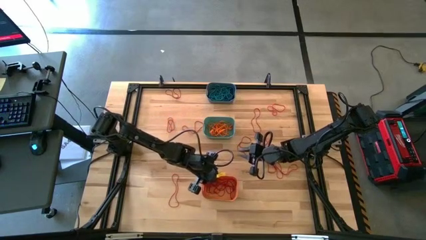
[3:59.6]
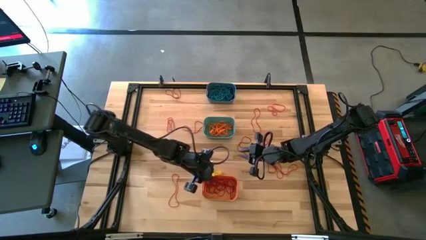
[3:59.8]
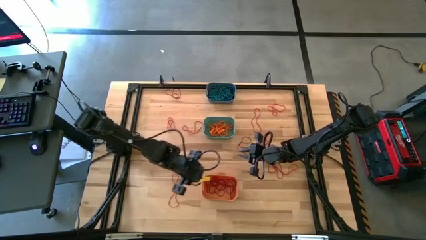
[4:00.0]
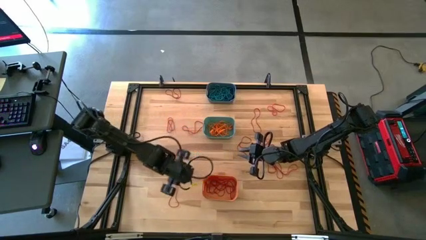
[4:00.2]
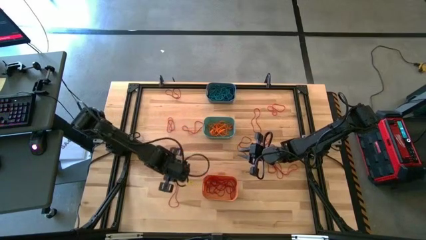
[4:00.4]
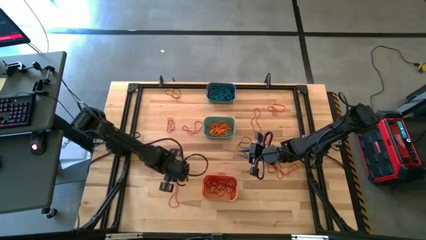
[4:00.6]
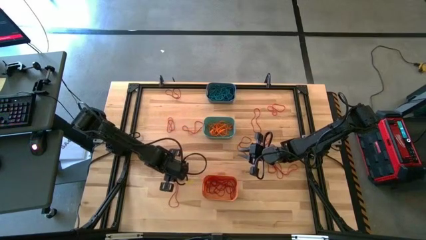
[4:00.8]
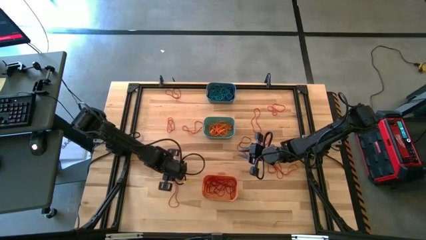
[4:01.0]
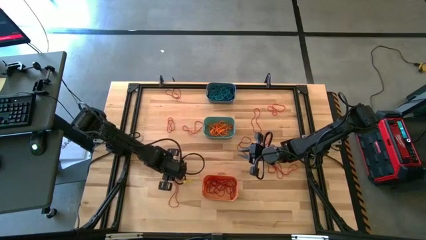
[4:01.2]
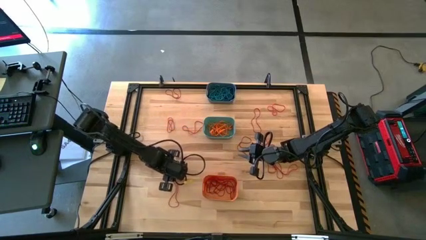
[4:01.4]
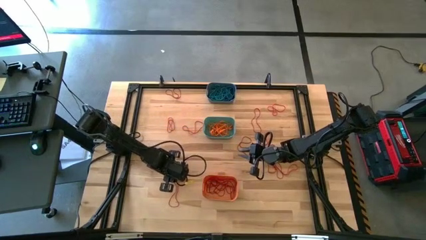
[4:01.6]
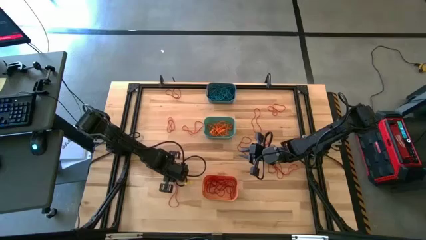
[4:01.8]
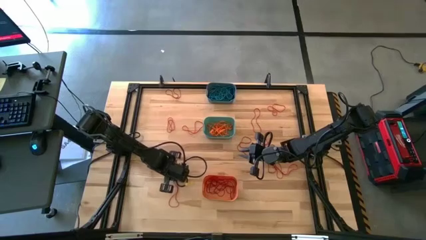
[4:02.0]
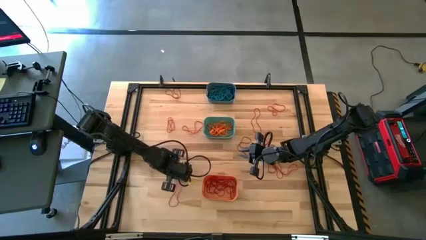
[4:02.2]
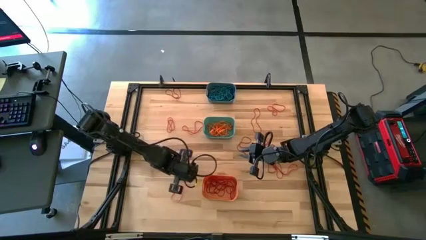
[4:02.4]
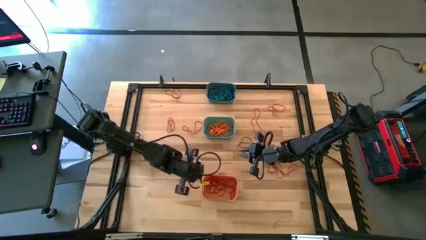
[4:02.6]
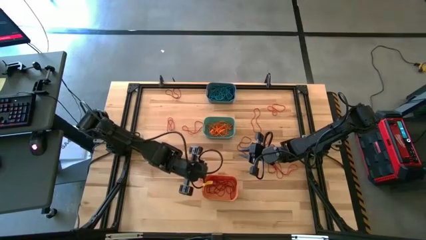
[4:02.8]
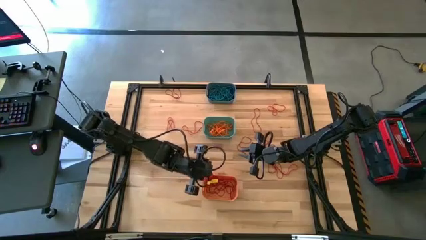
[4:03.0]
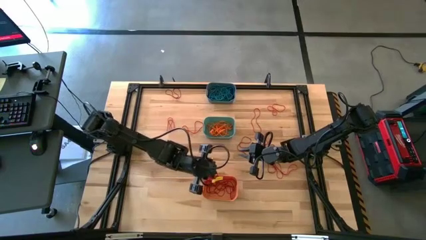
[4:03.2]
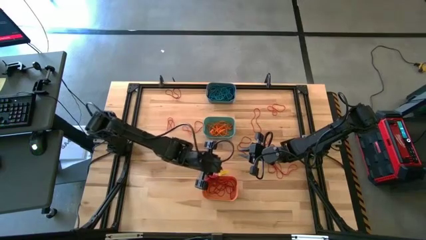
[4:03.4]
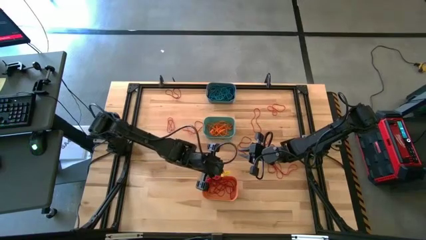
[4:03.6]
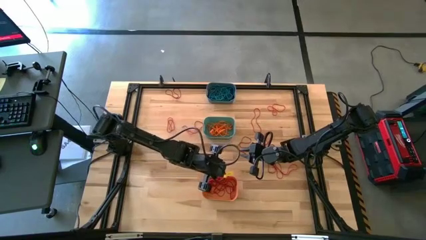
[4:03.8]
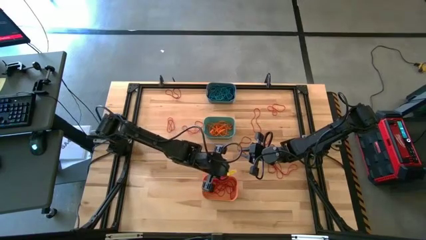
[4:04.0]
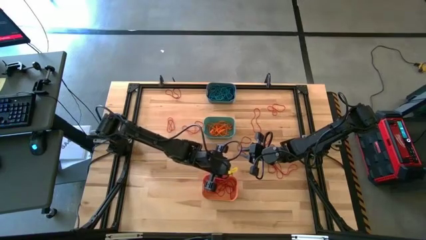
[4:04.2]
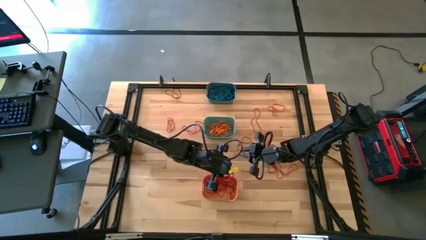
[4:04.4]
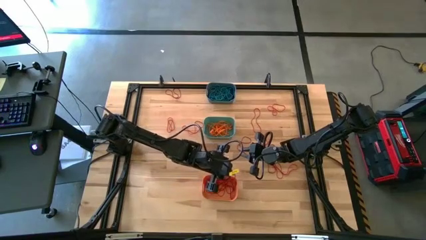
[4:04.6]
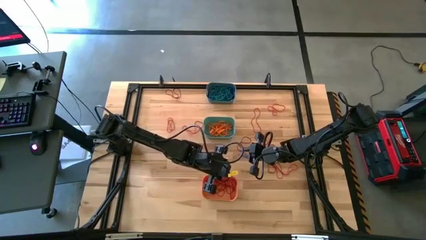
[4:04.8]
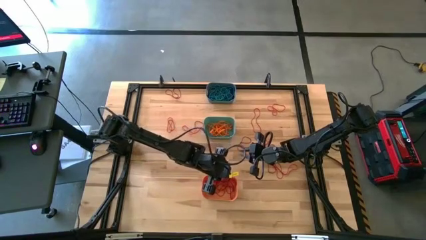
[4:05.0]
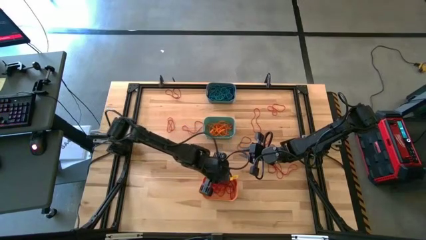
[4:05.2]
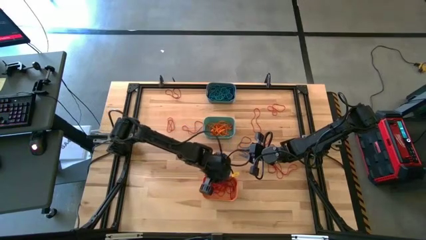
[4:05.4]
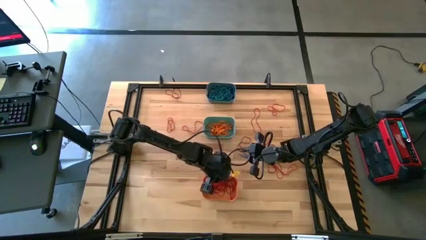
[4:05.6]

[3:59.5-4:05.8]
Task: Sort rubber bands into baskets
Put the red rubber band into the orange bin

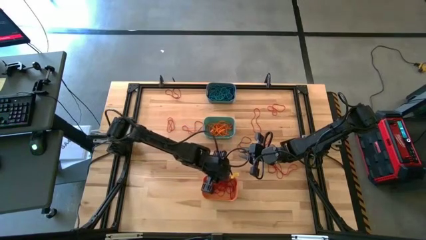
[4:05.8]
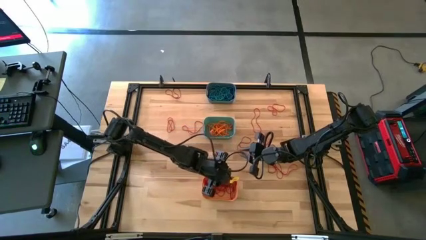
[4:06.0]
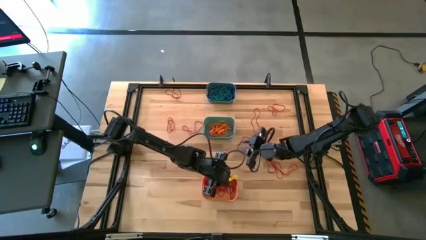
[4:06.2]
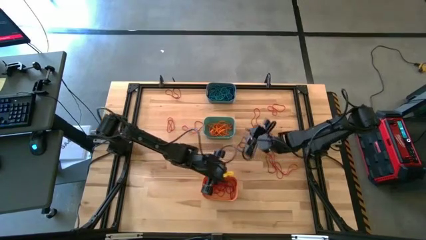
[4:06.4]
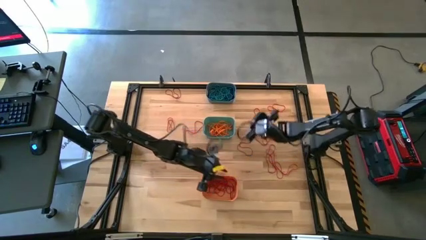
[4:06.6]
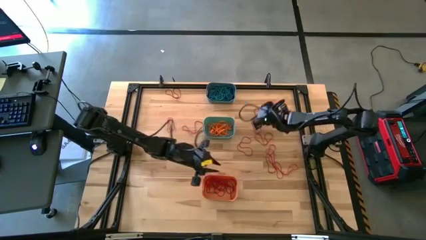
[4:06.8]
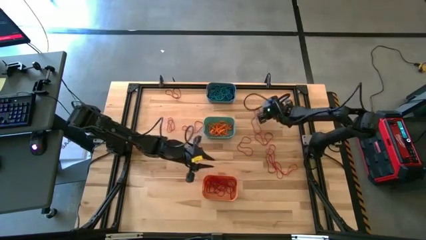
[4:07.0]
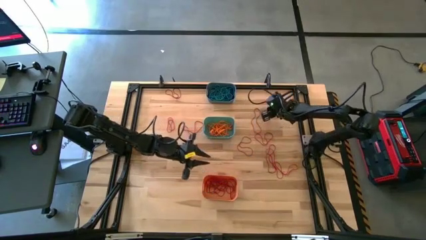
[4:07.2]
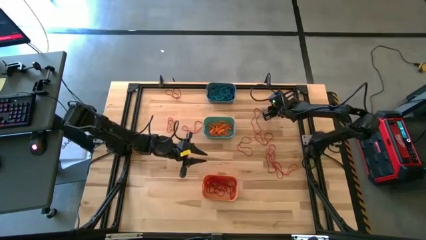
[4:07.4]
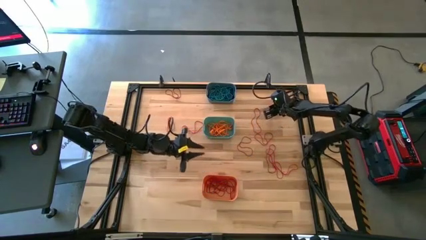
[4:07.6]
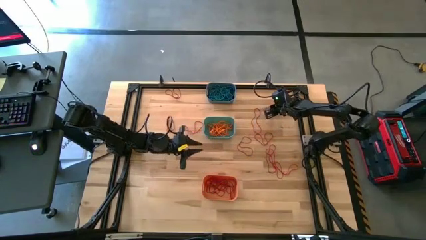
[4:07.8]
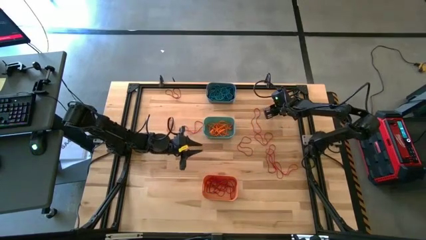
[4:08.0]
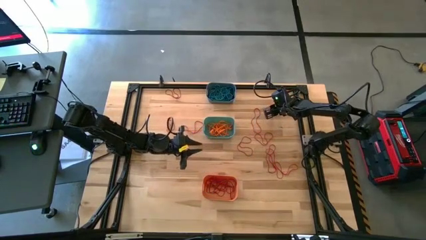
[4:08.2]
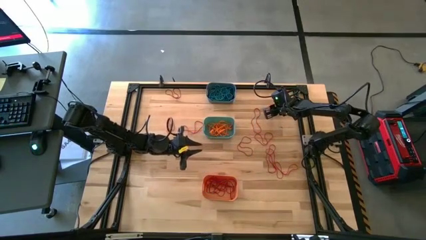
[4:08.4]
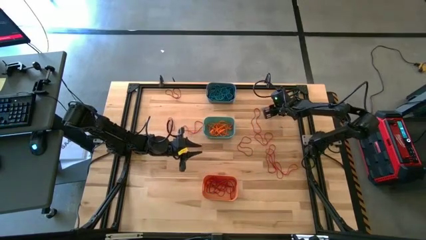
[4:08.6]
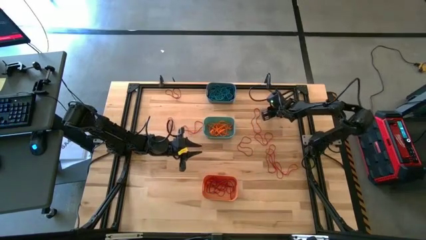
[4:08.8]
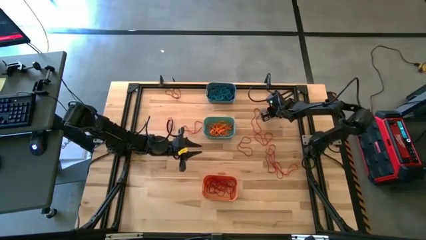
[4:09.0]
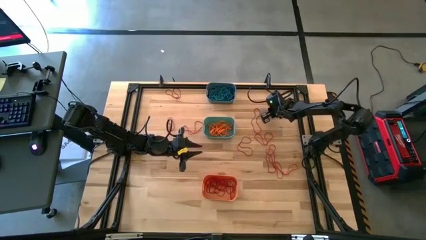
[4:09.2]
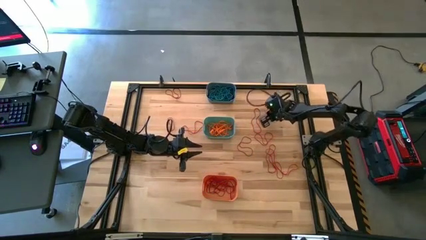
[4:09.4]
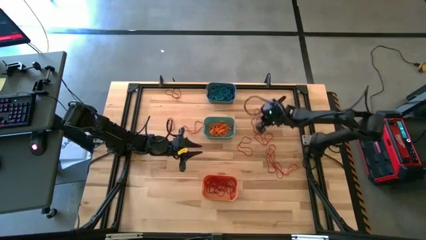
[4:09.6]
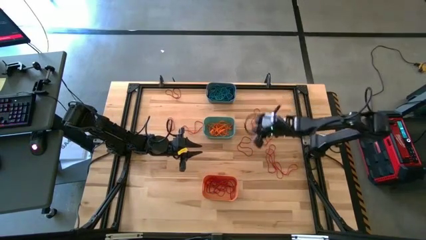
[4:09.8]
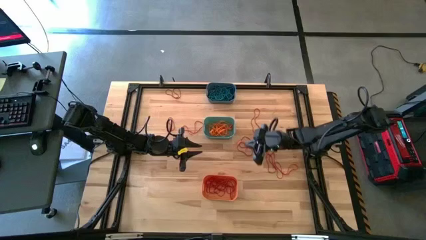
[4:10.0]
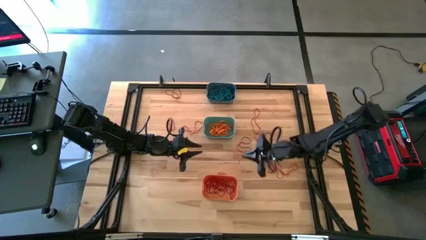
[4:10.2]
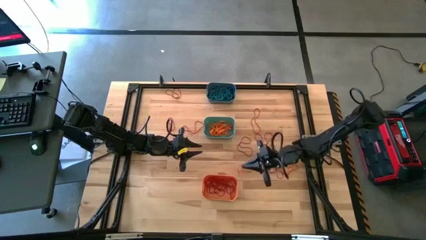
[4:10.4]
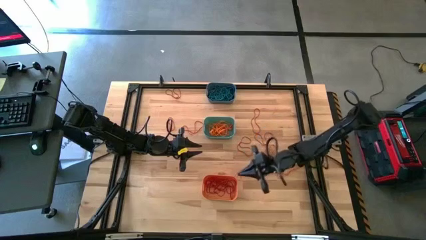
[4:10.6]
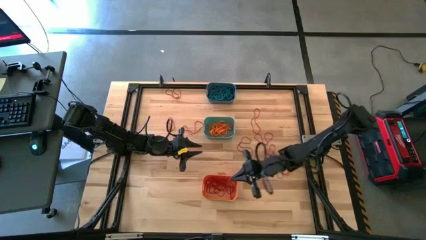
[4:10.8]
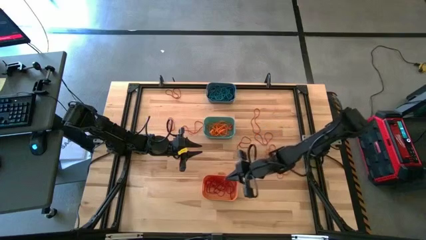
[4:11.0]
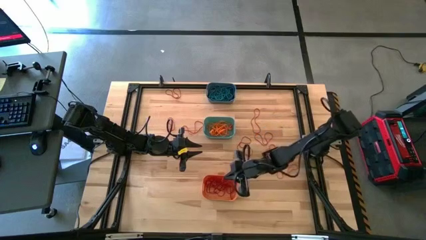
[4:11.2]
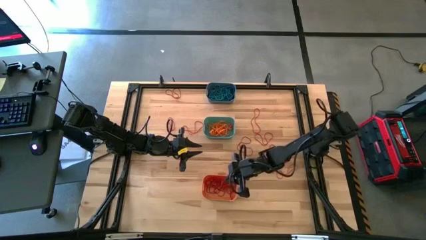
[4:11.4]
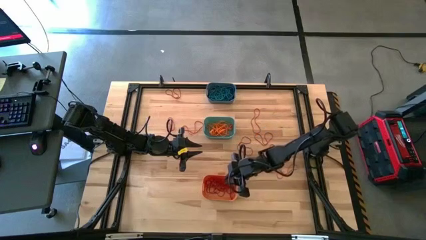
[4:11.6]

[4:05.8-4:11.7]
Put the red rubber band into the orange bin

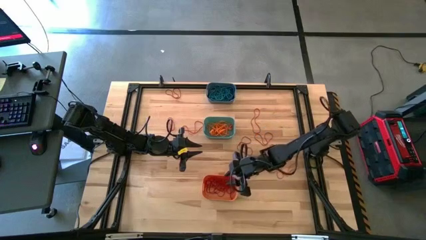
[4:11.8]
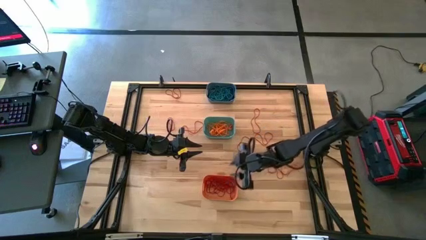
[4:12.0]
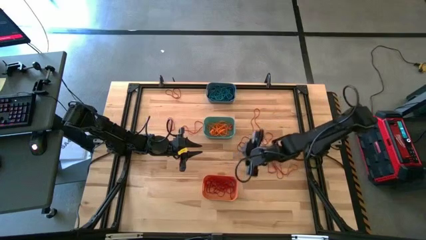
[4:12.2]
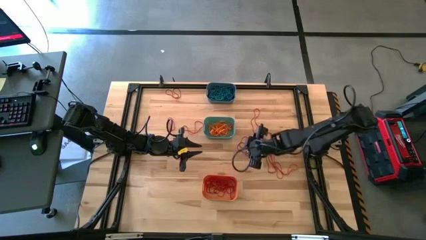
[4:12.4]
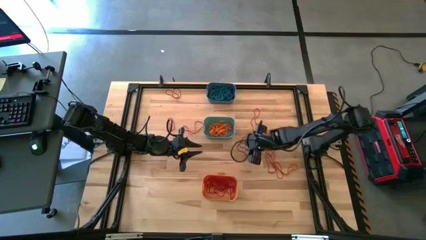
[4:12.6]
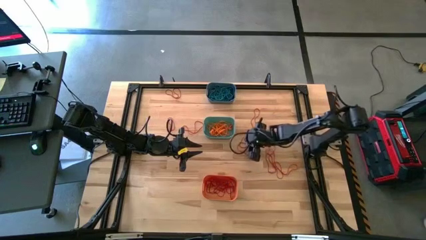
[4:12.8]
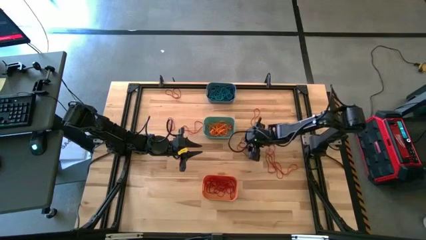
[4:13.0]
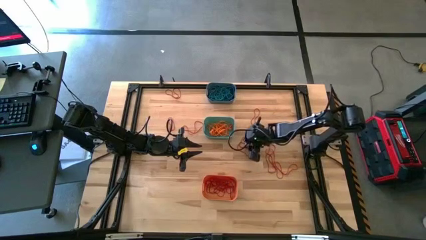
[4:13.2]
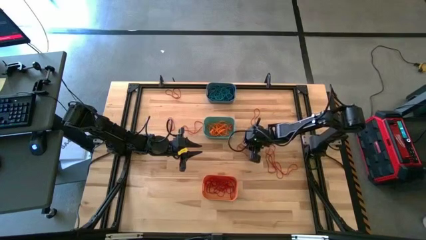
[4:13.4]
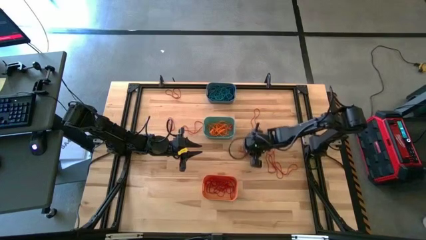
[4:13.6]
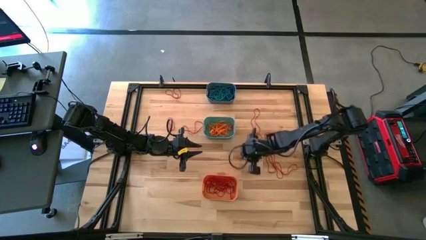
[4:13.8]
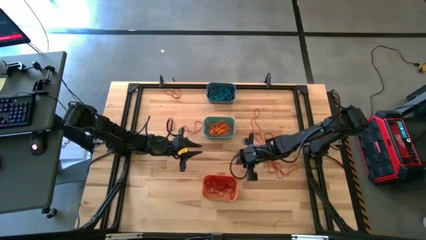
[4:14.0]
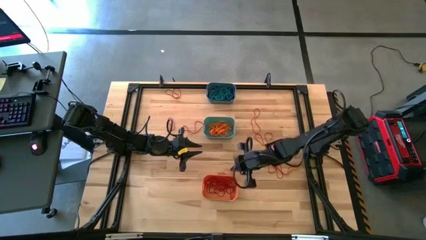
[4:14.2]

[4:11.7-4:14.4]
Put the red rubber band into the orange bin
